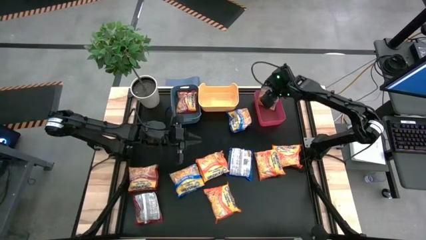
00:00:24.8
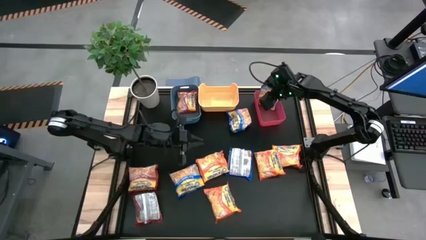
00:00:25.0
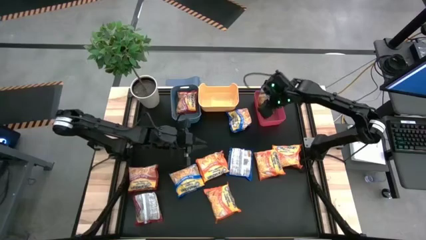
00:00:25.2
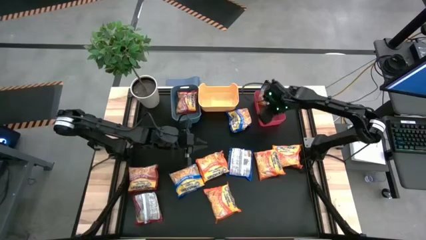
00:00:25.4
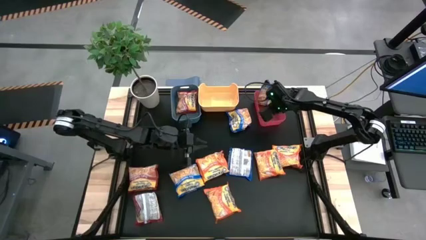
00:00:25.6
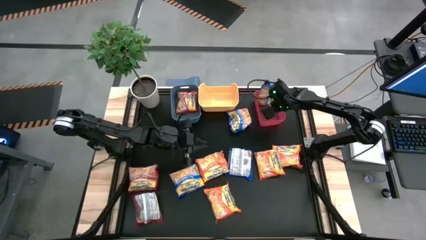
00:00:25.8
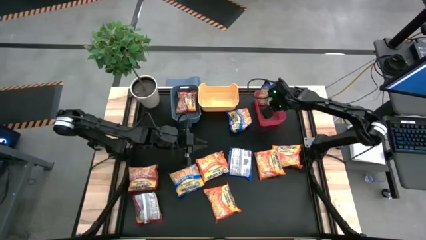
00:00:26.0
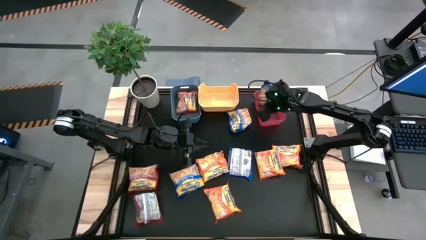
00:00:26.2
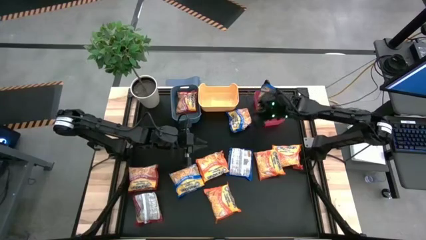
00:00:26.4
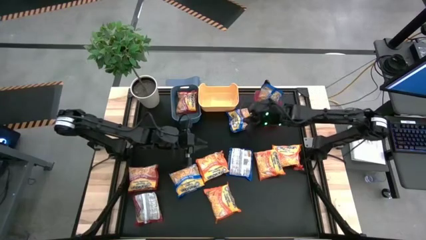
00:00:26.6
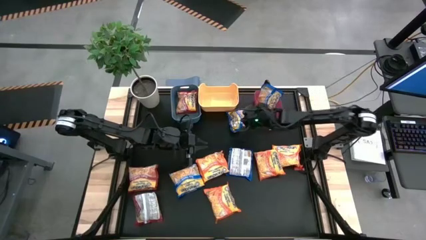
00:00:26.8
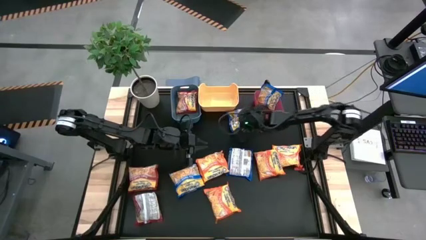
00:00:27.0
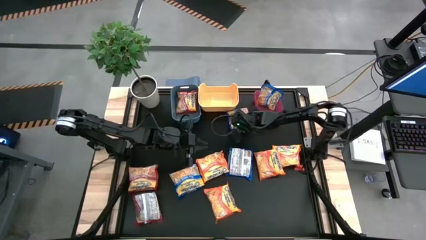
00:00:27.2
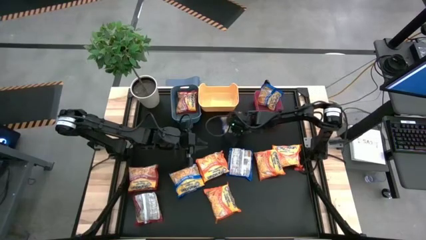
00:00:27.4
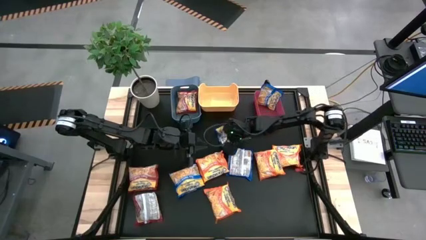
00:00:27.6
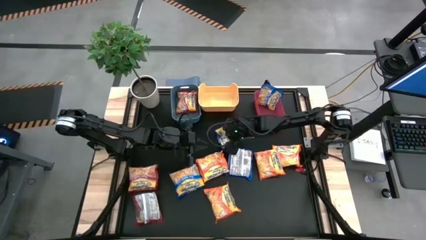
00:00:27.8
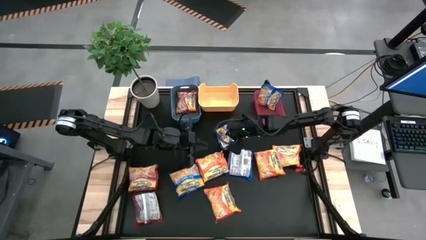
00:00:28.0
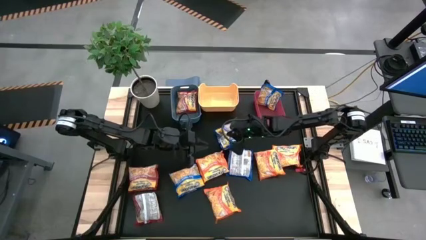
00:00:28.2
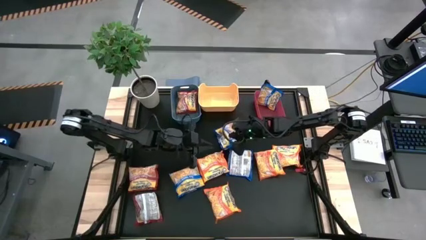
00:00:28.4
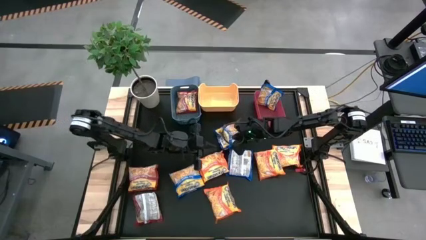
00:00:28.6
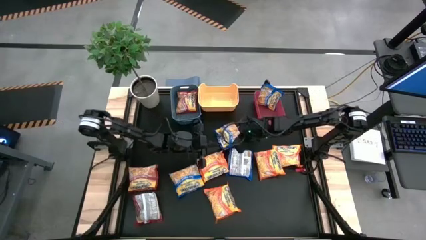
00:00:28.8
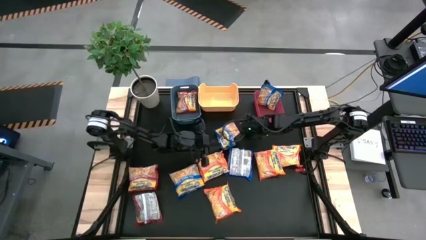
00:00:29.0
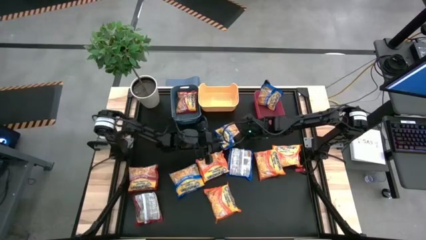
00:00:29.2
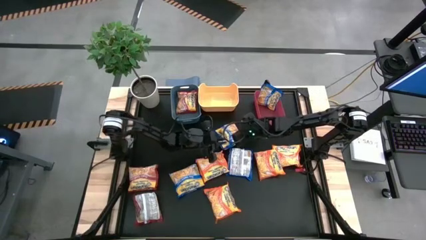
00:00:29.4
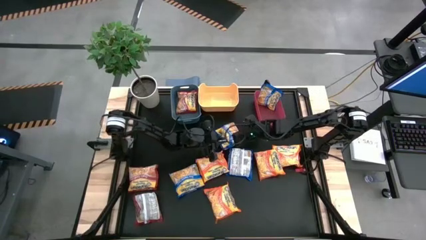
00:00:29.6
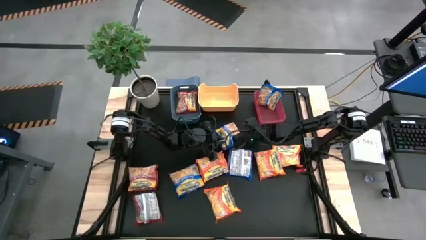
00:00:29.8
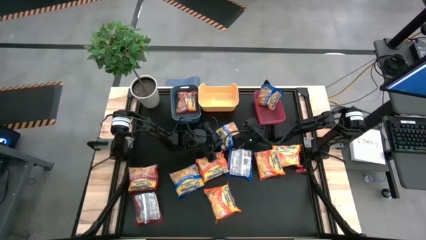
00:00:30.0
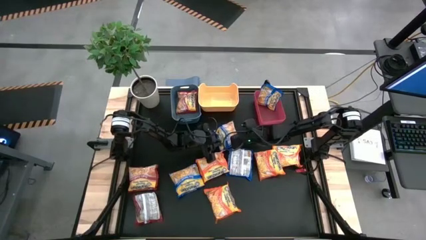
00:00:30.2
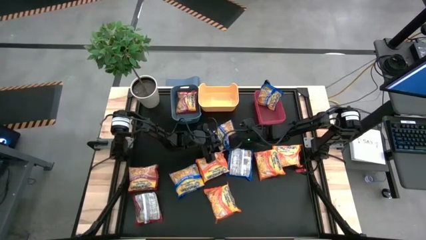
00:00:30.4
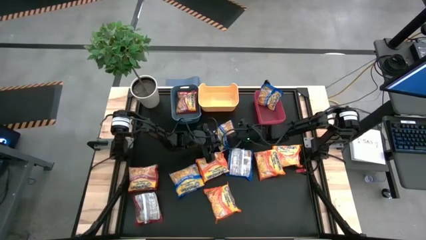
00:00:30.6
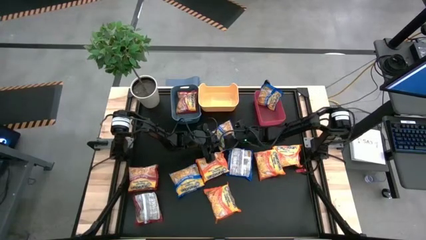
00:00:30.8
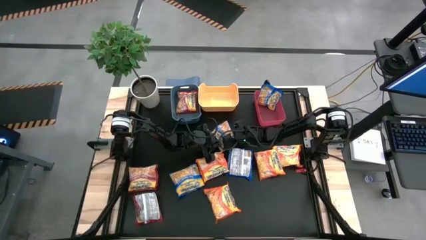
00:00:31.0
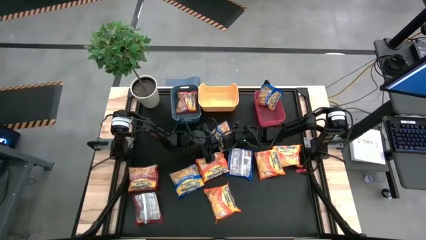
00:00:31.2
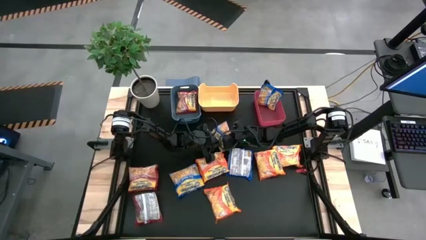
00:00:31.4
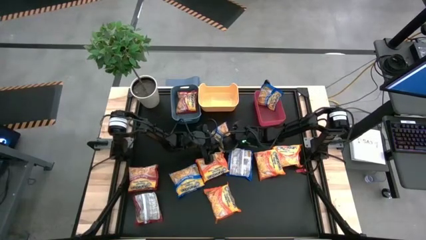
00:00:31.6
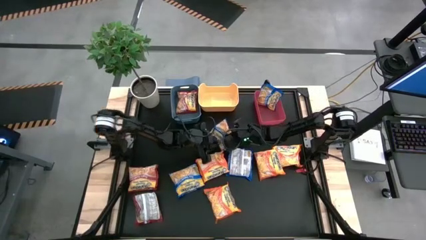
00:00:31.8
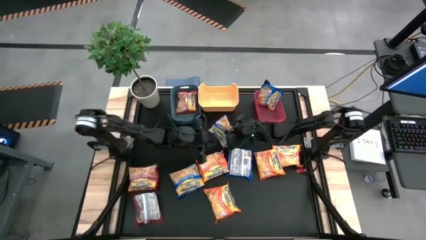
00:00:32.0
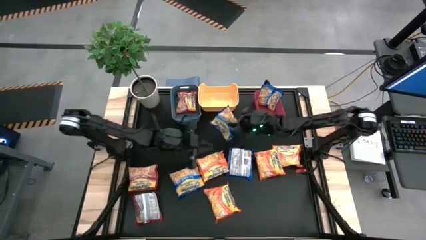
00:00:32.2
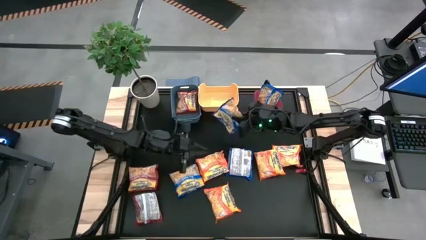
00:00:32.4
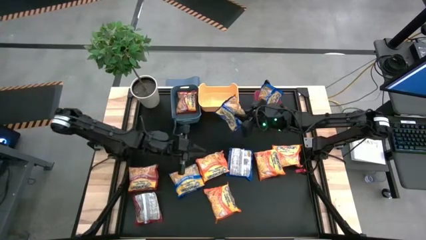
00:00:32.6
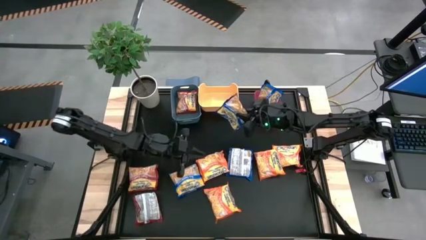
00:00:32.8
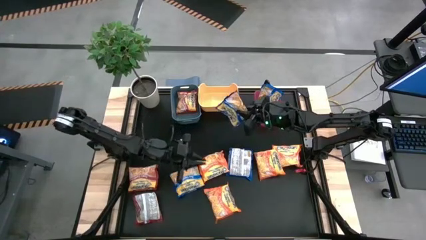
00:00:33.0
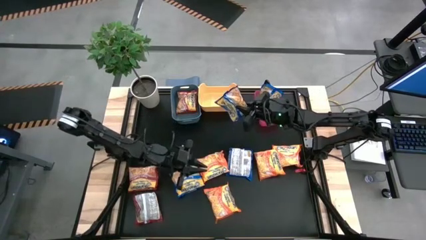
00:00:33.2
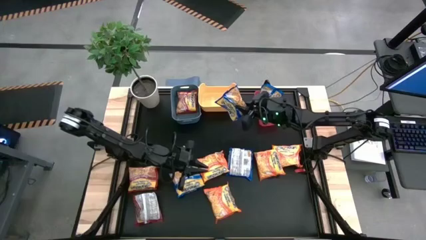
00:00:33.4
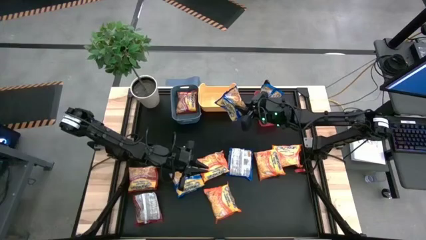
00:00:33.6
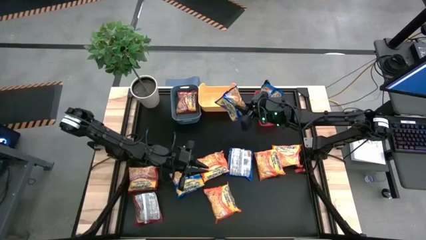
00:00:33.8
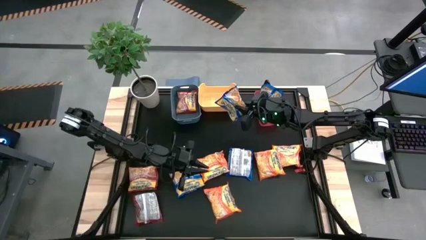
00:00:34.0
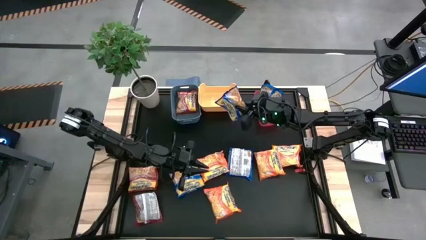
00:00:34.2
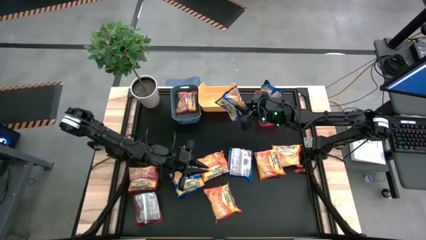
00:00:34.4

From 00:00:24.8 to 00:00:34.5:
Task: Sort Maruchan noodles
Put the blue noodle pack into the red bin

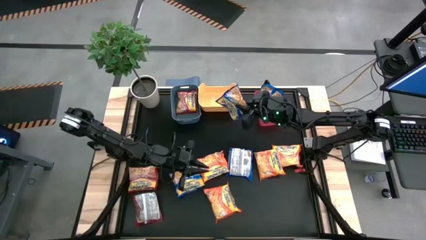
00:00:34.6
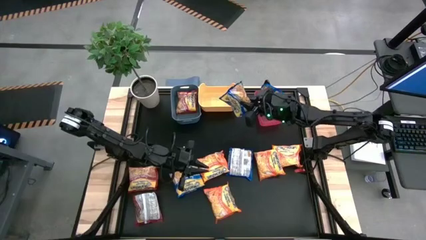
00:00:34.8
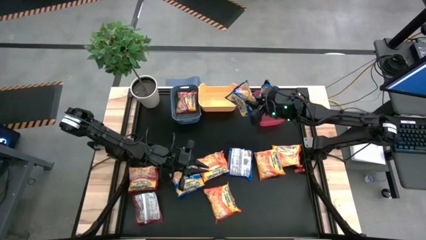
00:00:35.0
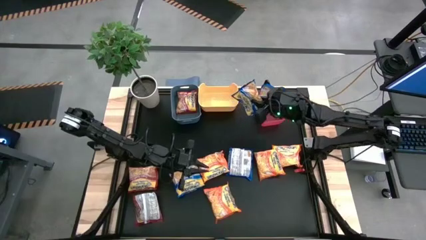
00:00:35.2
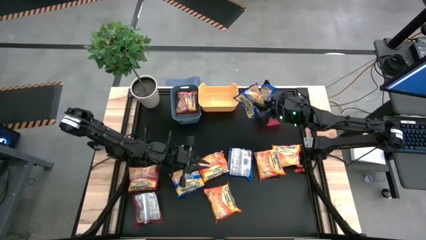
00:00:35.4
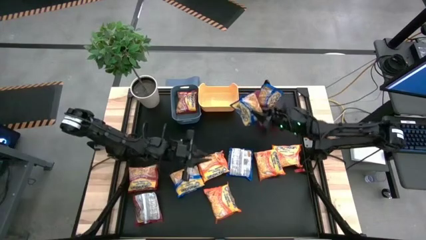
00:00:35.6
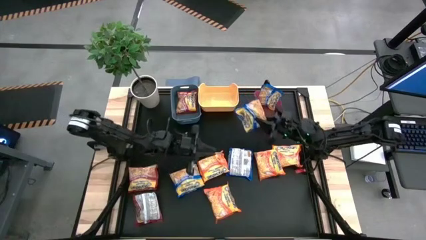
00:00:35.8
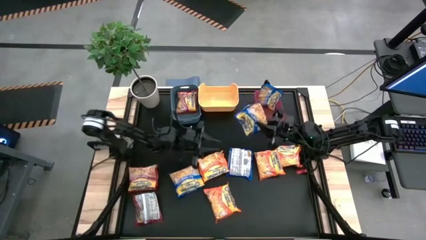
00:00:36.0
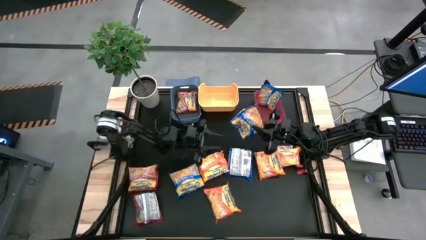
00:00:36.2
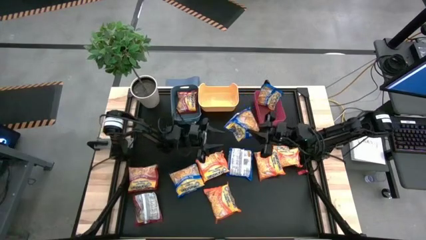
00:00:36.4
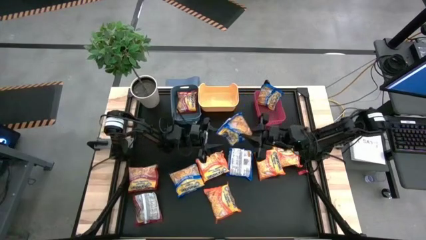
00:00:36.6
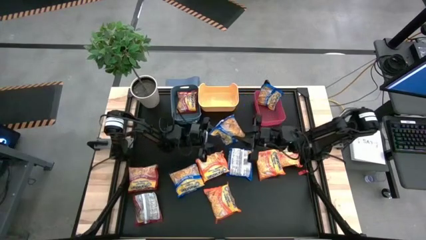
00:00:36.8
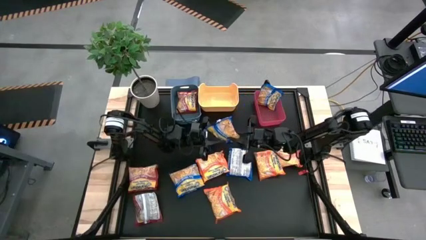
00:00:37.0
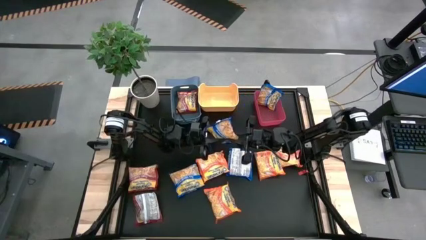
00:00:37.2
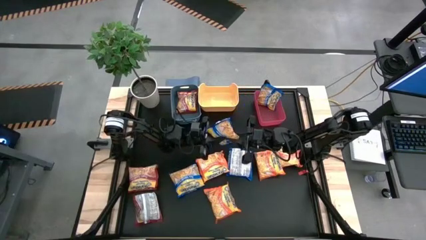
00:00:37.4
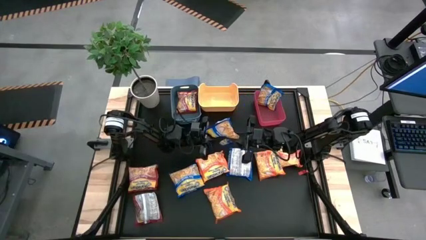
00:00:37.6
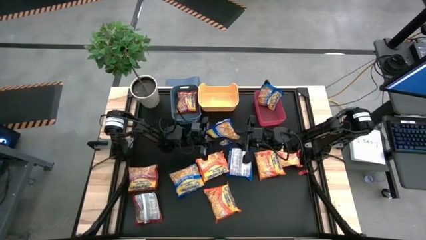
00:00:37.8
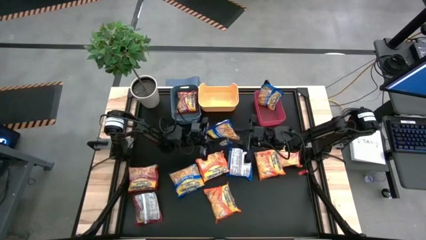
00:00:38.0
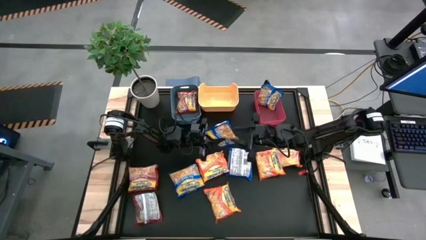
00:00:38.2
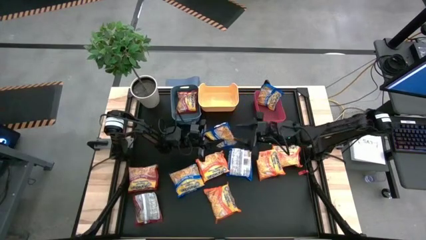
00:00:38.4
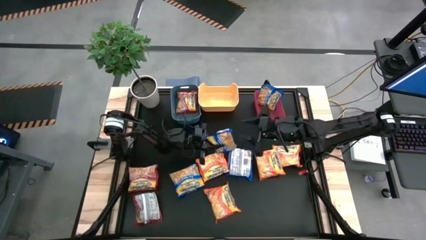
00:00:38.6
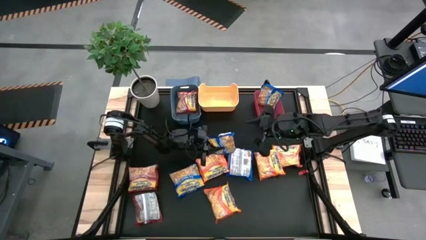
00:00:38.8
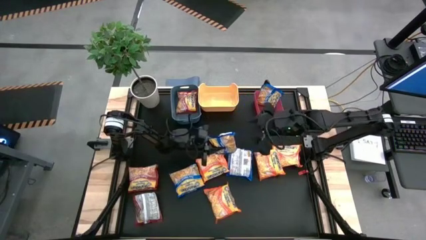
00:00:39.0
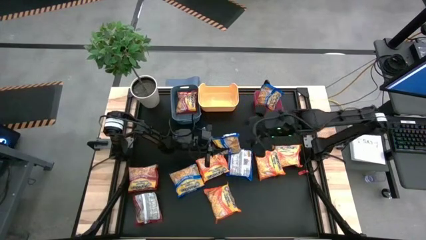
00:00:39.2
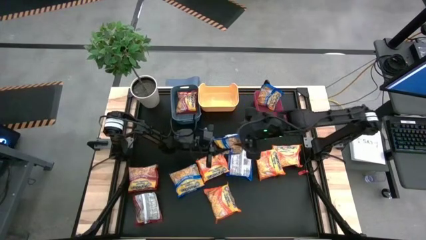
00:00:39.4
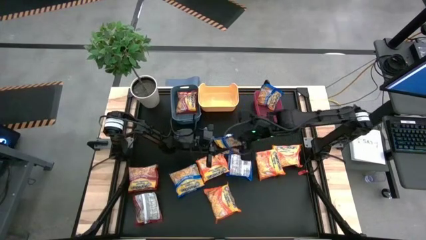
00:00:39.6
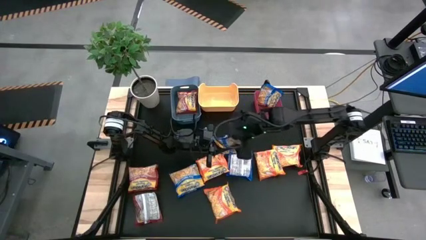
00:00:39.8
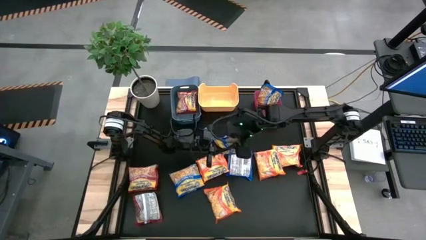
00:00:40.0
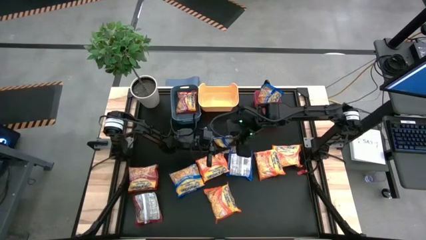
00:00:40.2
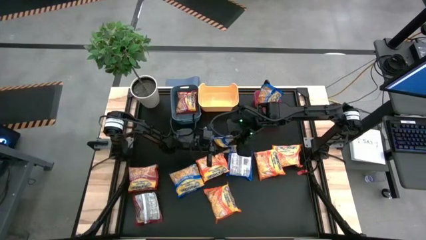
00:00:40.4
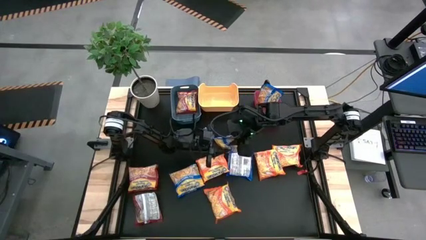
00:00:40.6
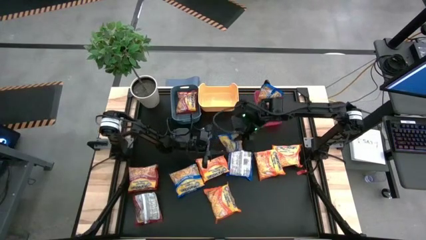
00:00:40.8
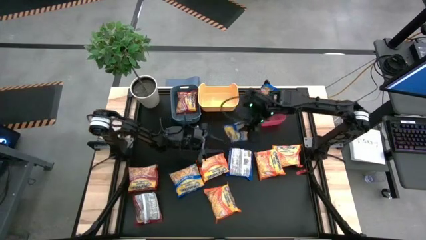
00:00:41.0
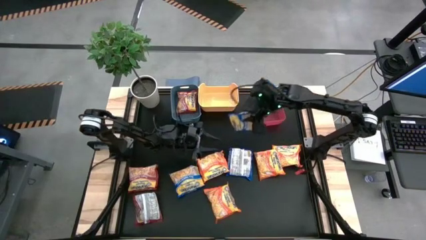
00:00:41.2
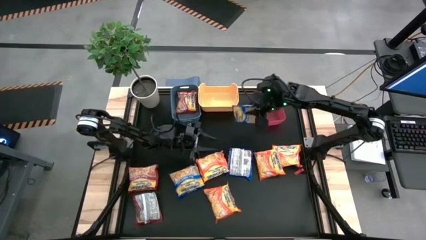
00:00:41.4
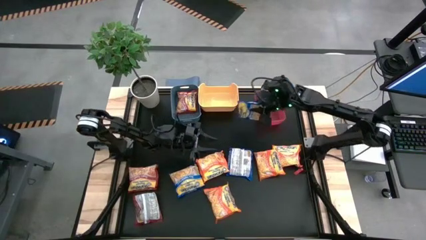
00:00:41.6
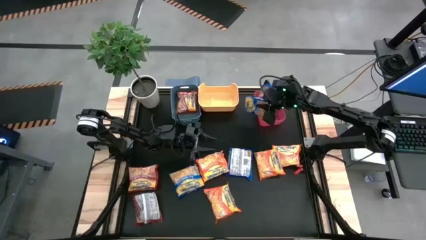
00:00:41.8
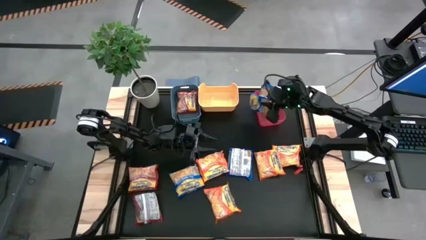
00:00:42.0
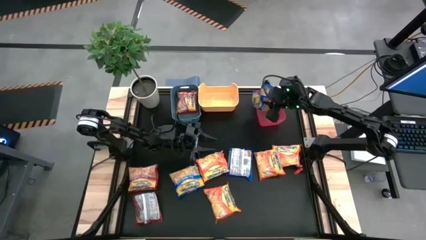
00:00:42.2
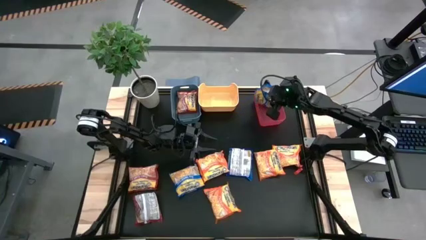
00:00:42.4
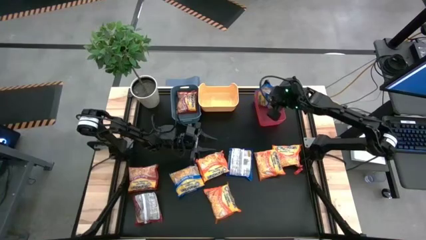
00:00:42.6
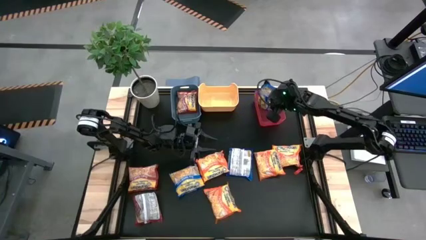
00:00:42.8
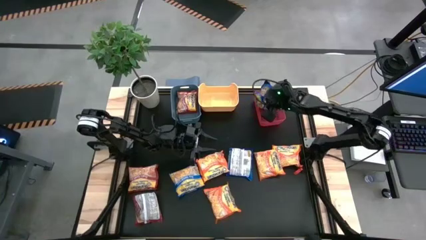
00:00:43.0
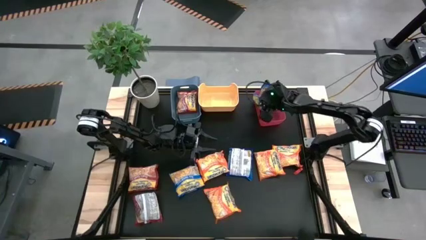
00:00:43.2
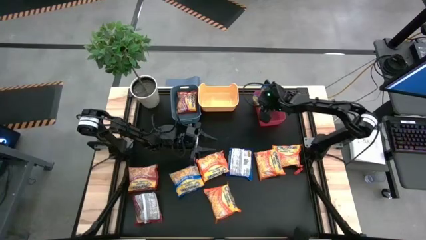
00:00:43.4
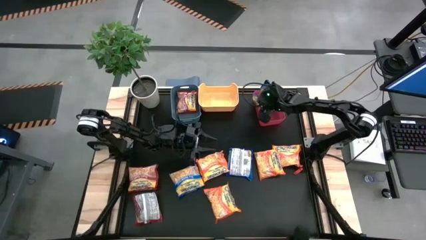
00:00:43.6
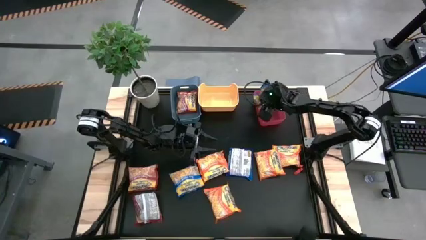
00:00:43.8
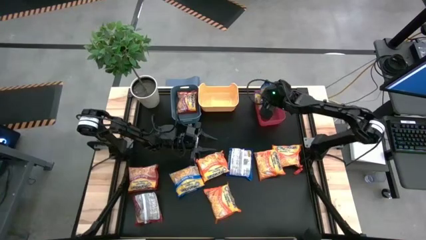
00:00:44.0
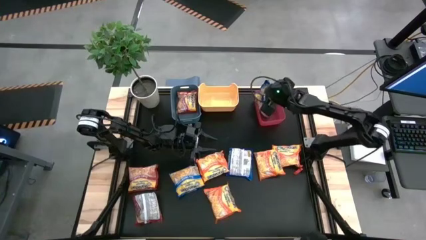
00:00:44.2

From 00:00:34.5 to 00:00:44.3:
Put the blue noodle pack into the red bin
